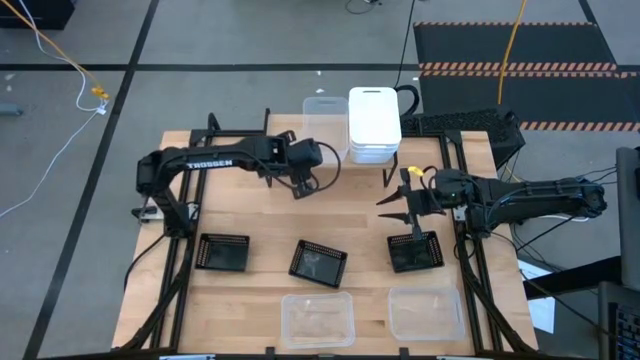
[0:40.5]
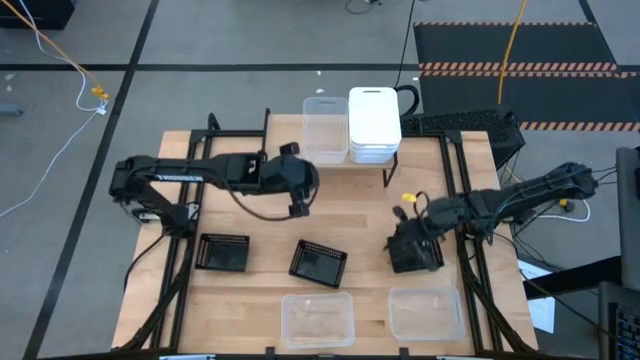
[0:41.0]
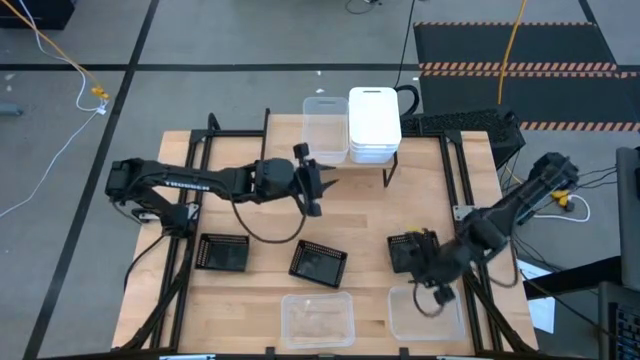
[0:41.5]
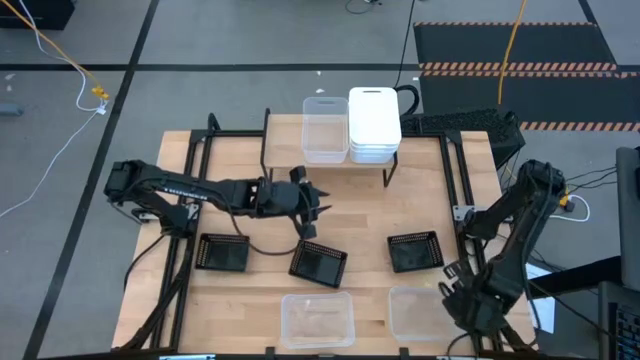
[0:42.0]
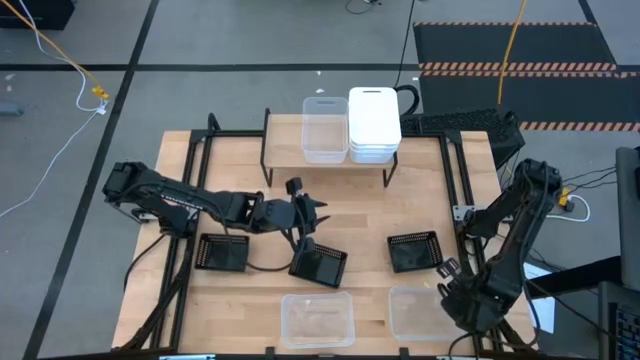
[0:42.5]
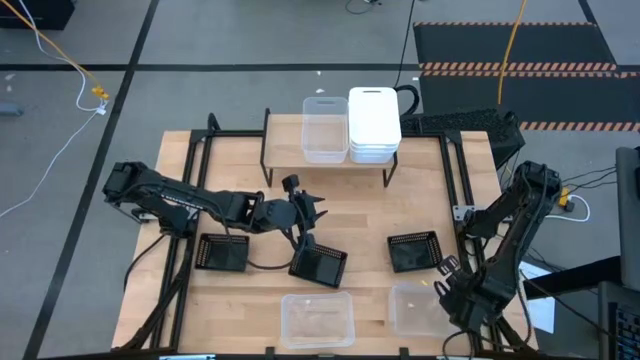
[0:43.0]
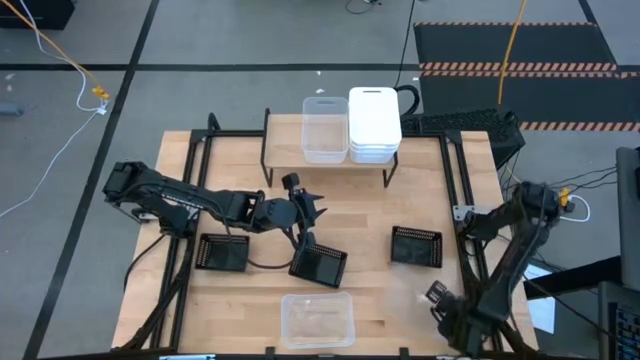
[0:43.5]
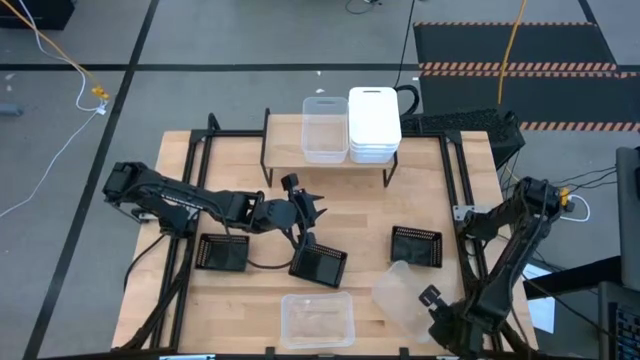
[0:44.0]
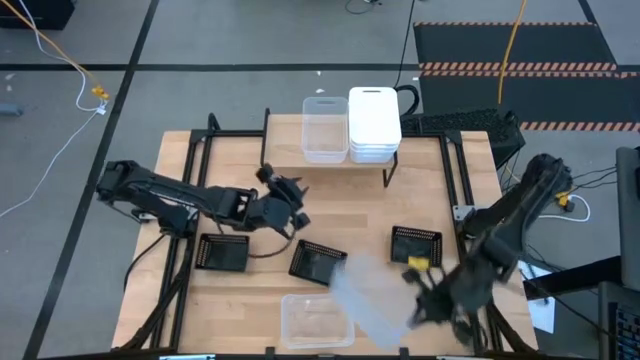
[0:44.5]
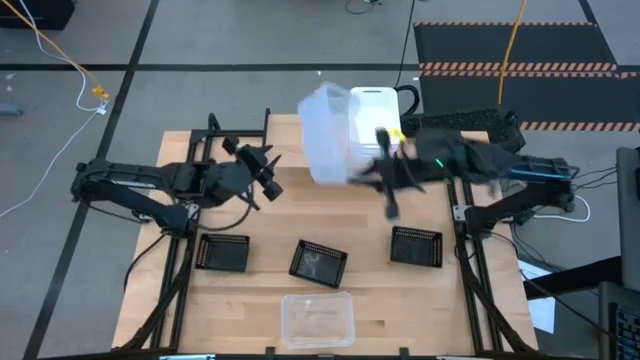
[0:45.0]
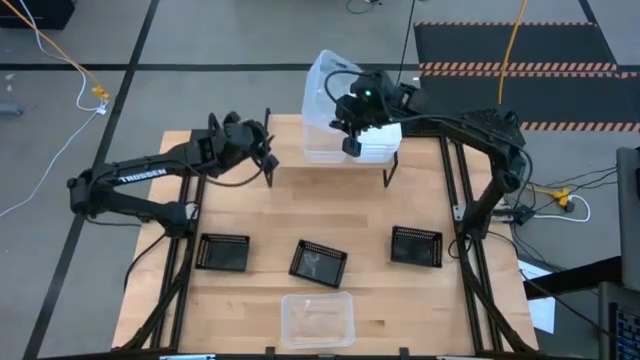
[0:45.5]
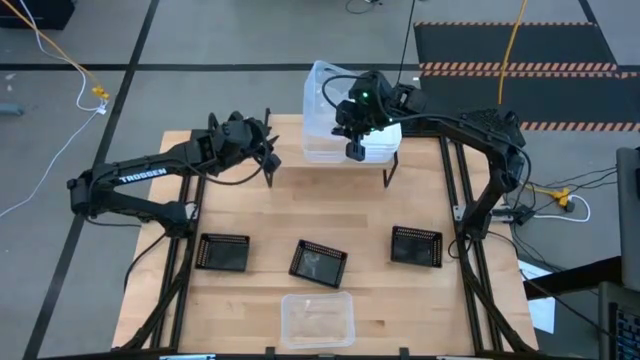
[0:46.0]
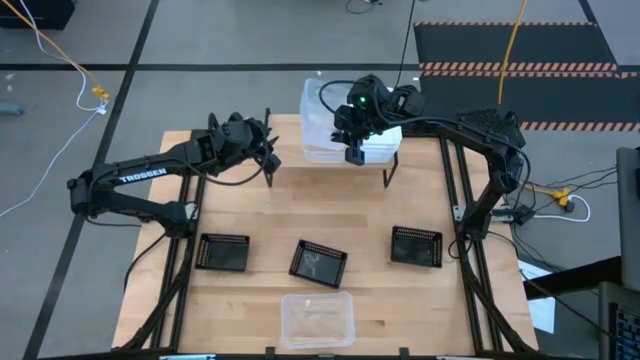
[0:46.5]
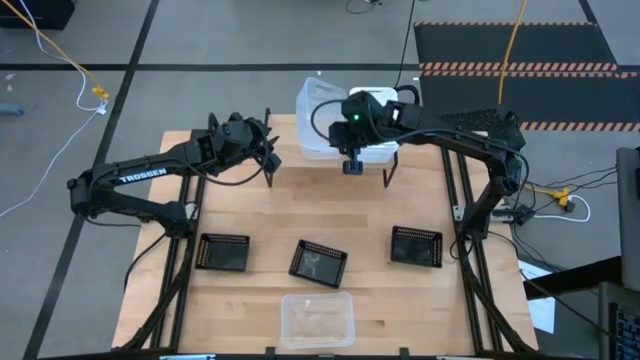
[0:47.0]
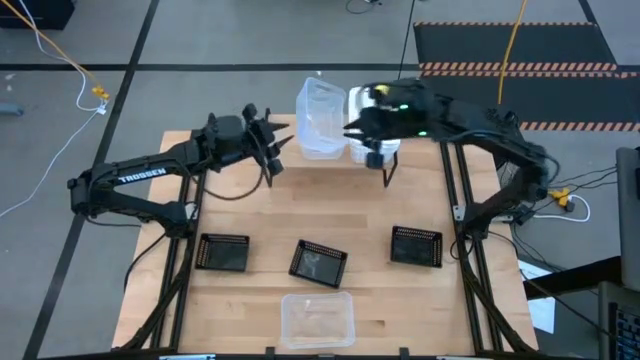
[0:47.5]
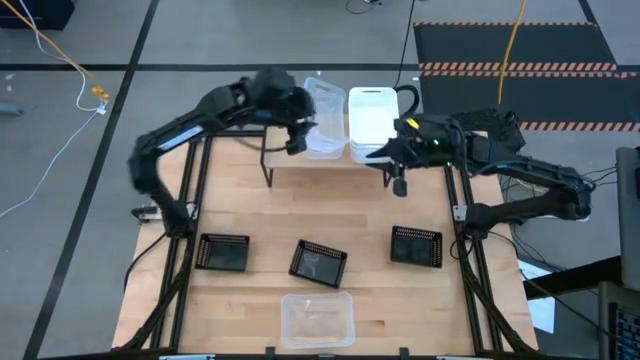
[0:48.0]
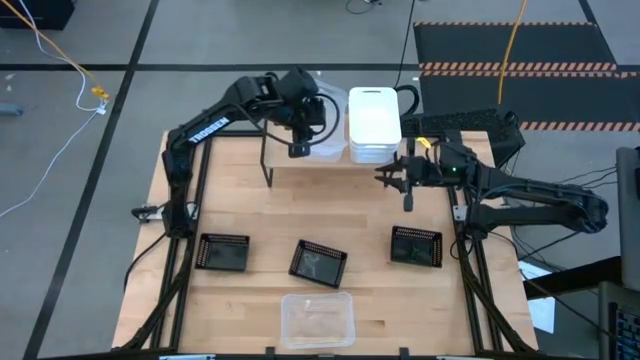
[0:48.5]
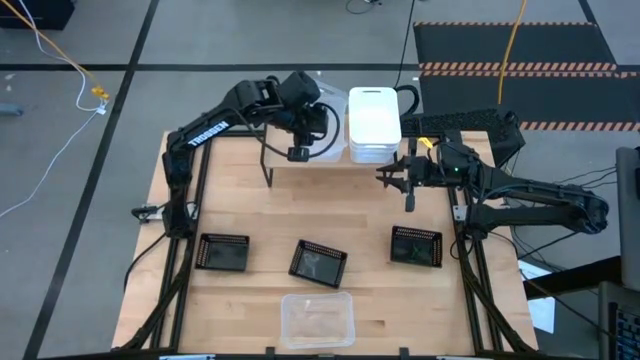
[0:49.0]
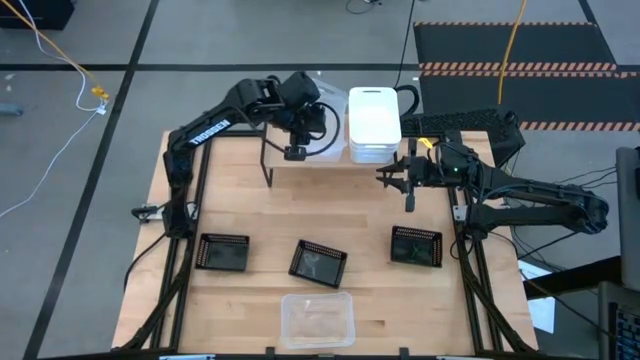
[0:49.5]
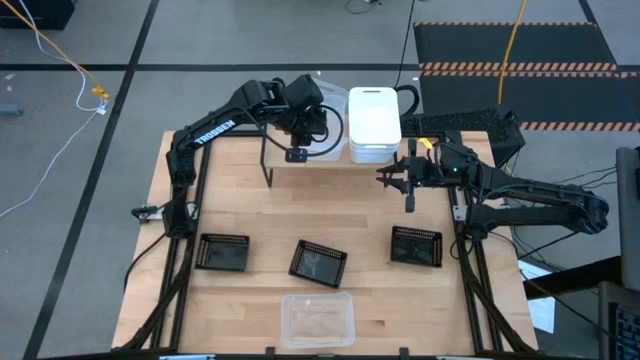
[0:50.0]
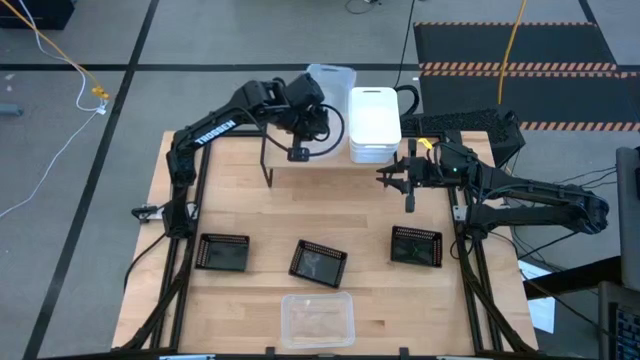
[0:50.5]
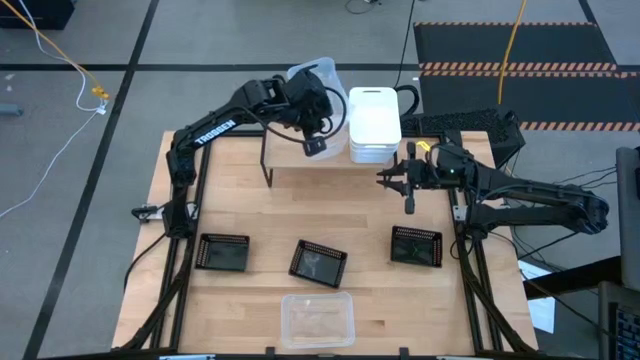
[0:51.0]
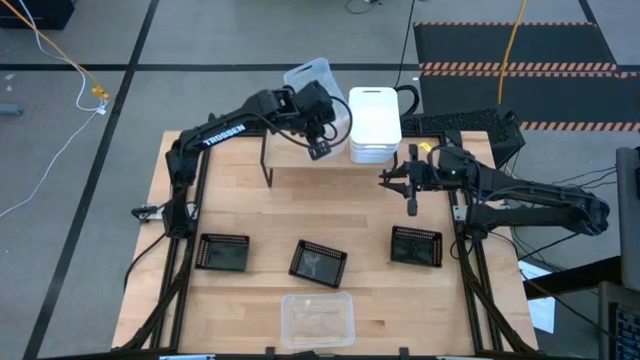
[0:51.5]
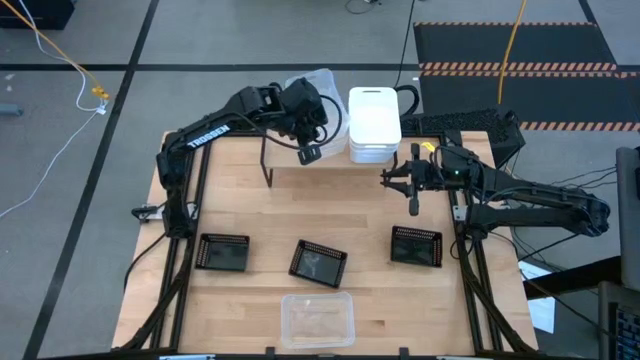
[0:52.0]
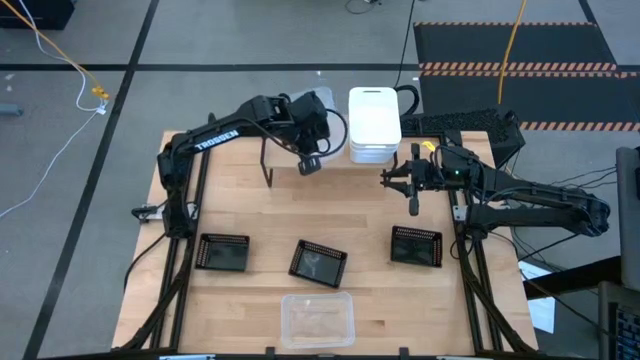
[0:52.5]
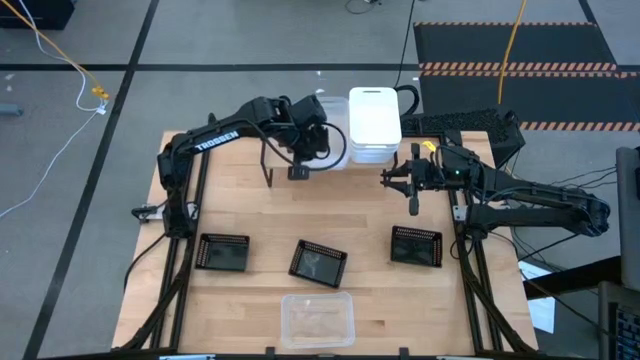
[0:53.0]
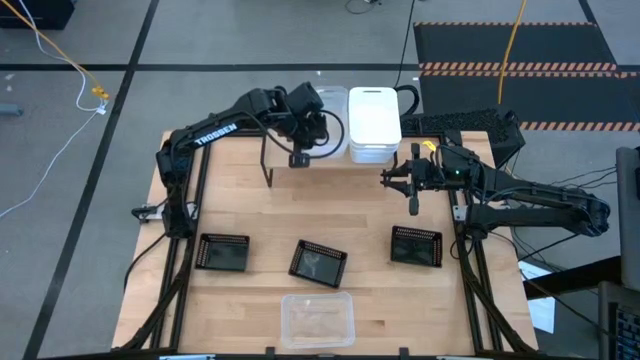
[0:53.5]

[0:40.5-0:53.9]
Task: Stack baskets on shelf by color
Stack the right transparent bin on top of the transparent bin on the shelf

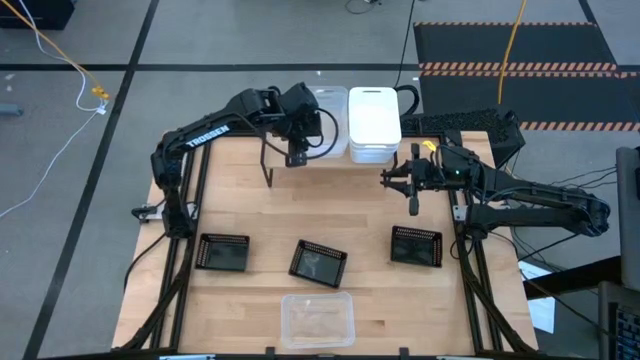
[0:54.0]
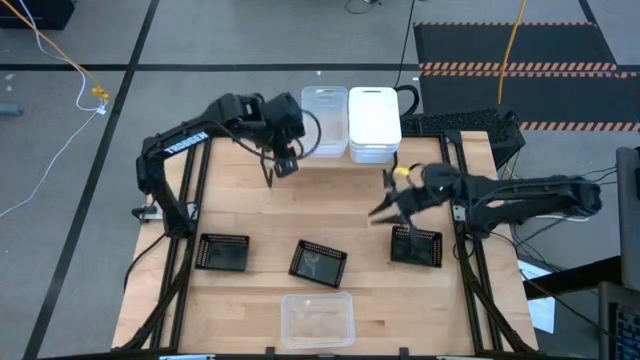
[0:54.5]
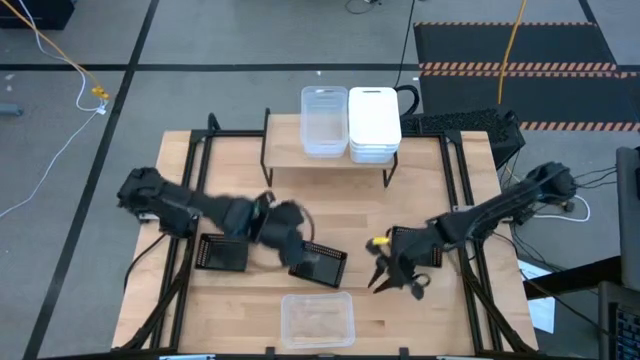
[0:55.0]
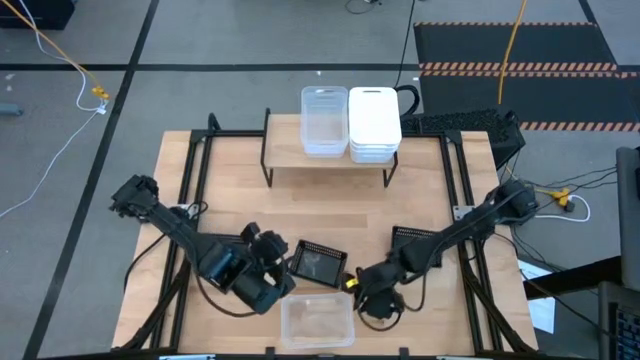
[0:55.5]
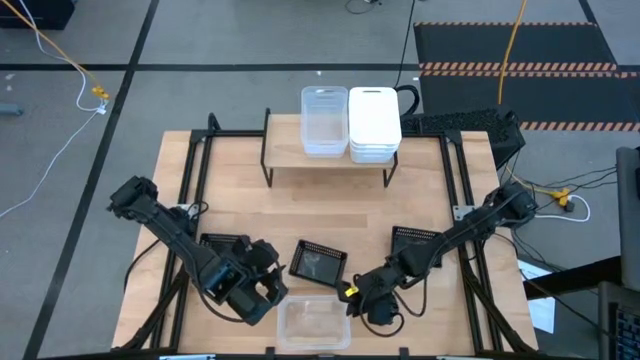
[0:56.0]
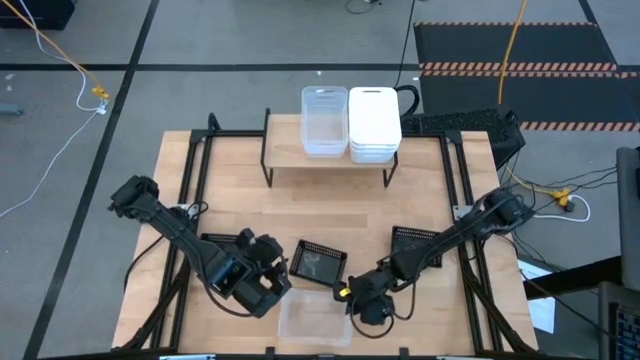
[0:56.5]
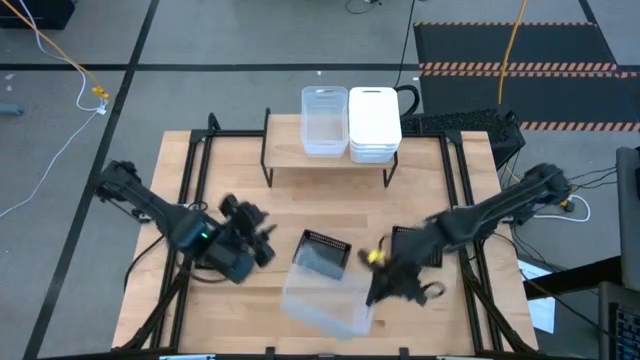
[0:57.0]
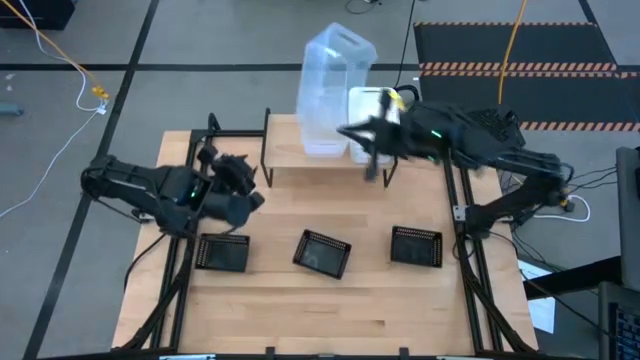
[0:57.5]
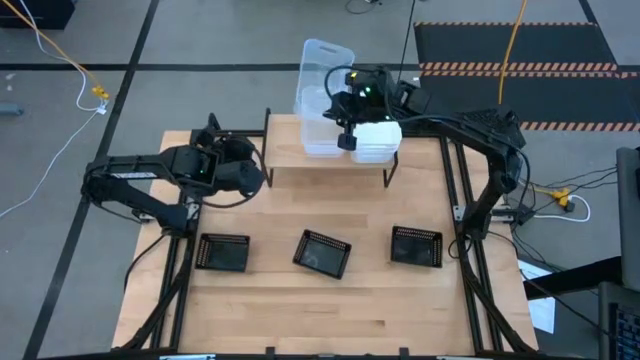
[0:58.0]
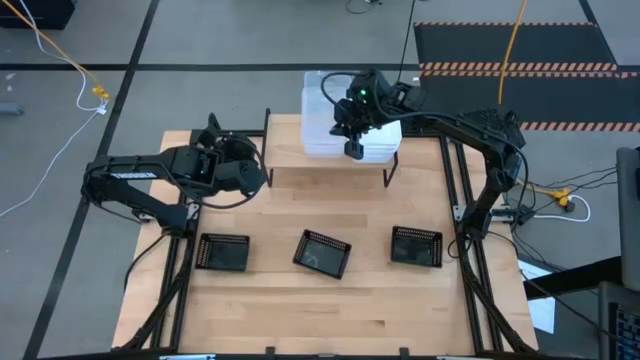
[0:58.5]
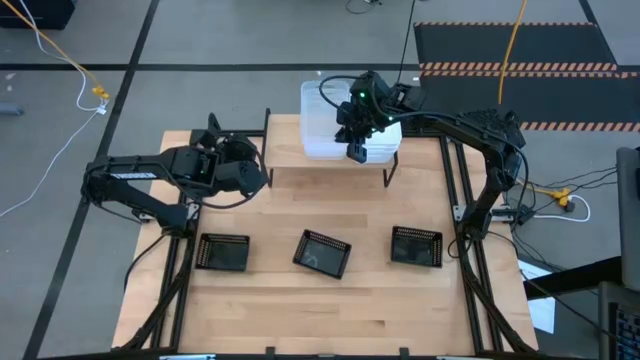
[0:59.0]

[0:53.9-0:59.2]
Stack the transparent bin on top of the transparent bins on the shelf

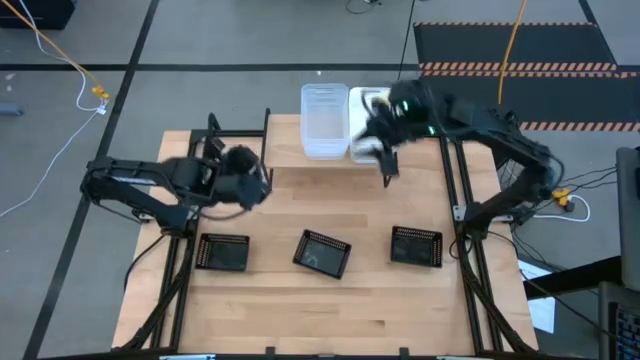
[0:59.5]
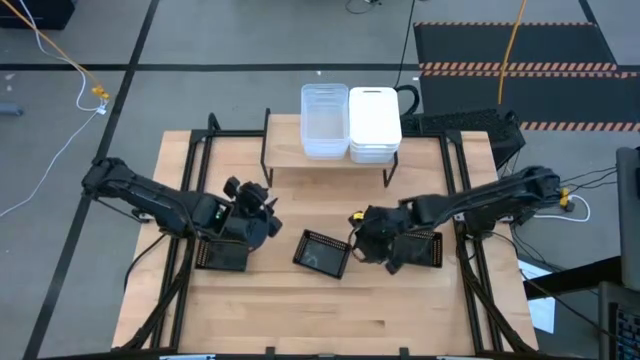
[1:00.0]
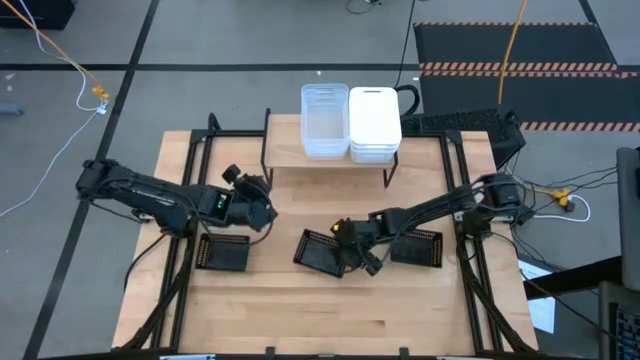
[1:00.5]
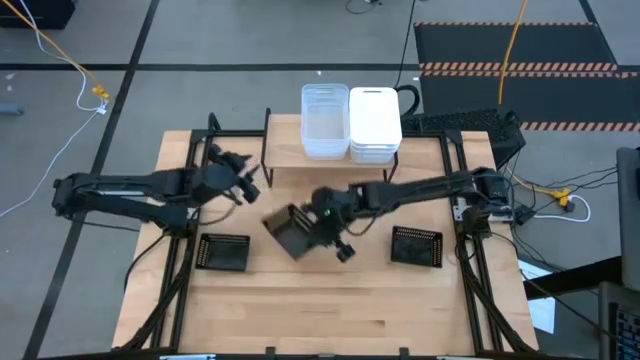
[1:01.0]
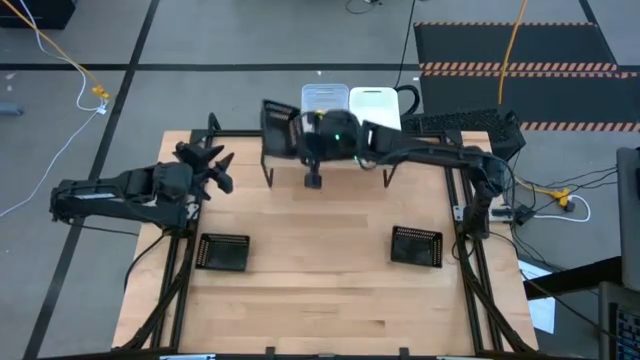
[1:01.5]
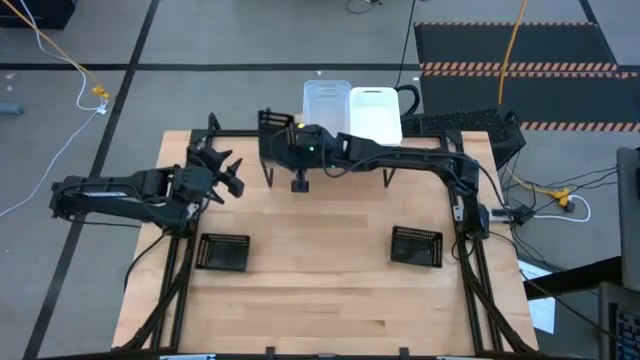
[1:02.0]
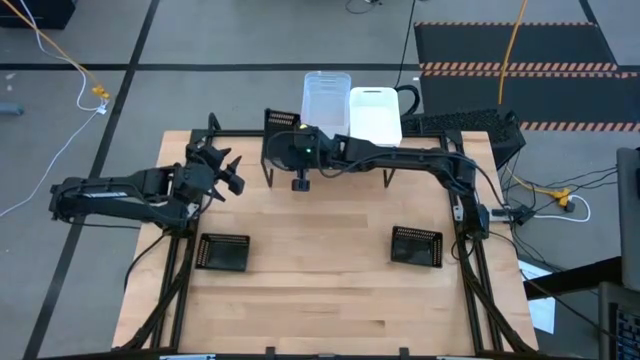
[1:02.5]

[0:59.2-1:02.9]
Put the center black bin on the shelf
